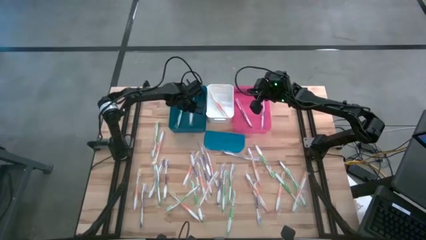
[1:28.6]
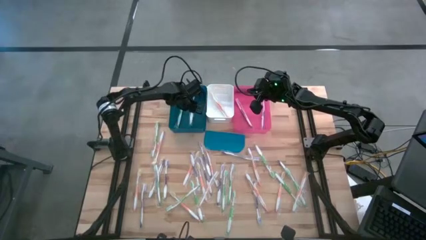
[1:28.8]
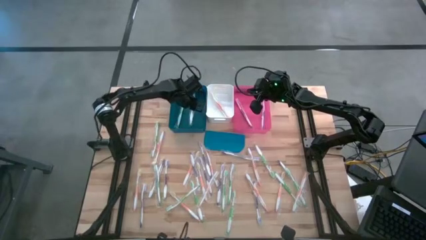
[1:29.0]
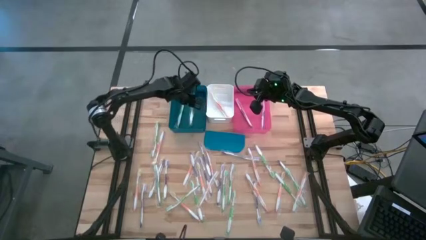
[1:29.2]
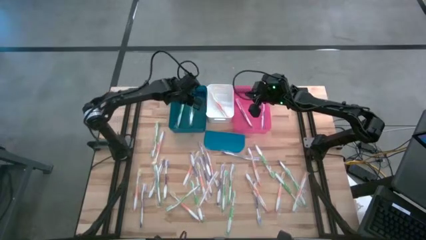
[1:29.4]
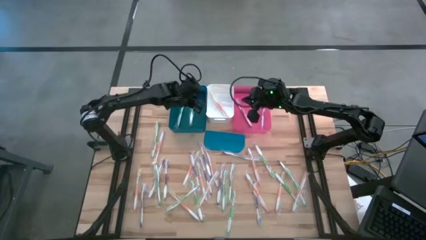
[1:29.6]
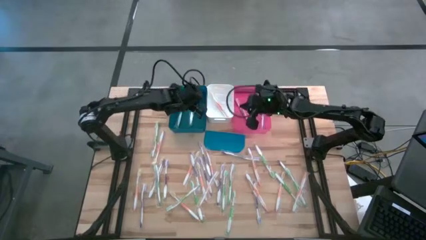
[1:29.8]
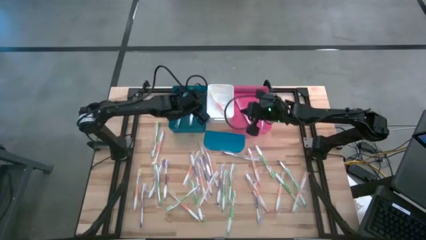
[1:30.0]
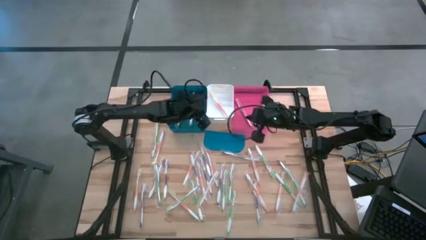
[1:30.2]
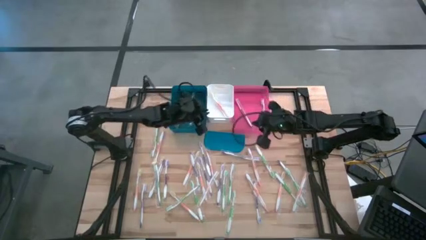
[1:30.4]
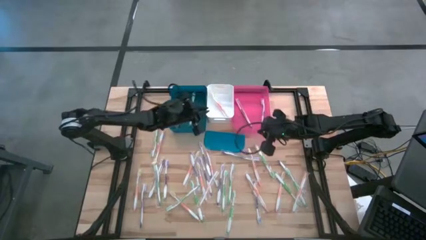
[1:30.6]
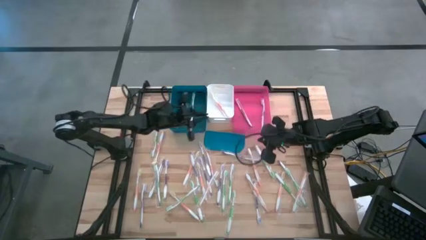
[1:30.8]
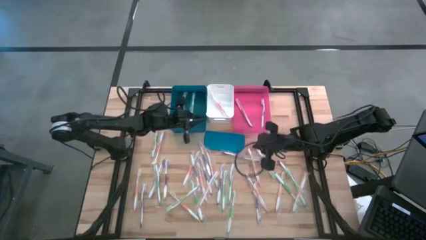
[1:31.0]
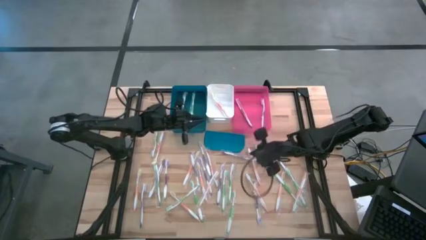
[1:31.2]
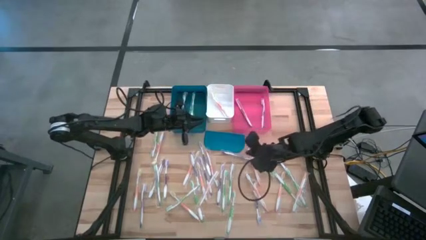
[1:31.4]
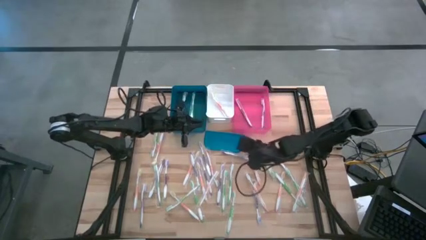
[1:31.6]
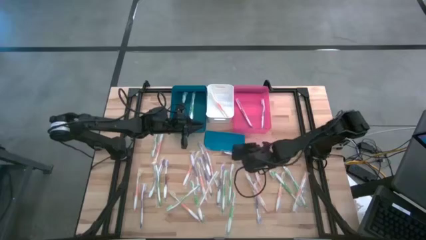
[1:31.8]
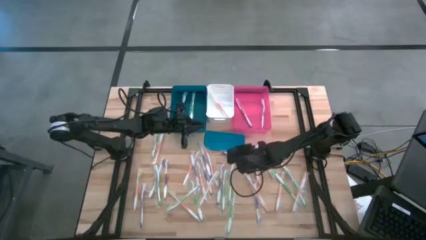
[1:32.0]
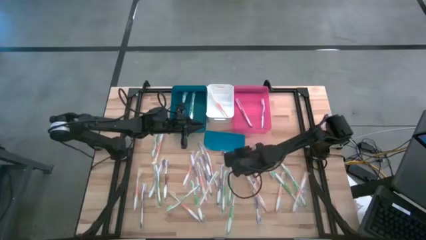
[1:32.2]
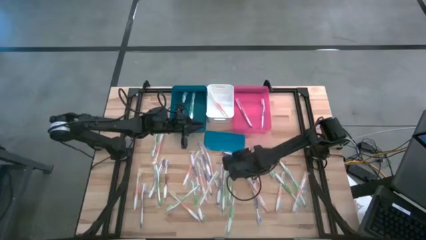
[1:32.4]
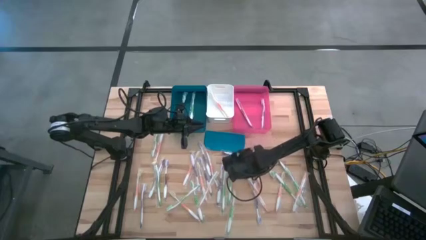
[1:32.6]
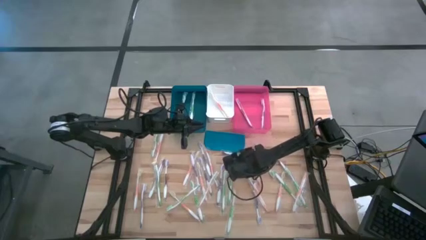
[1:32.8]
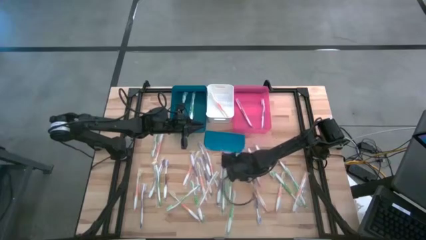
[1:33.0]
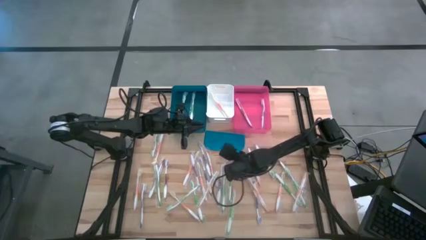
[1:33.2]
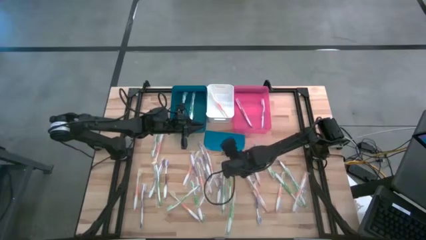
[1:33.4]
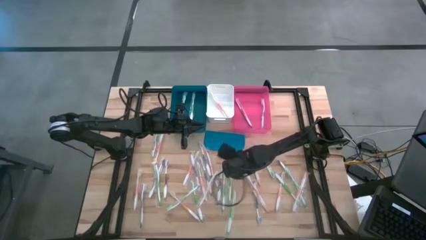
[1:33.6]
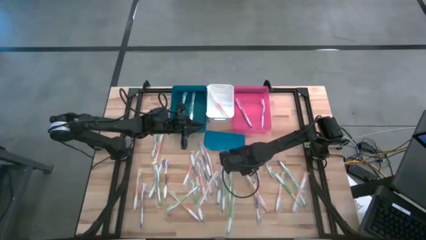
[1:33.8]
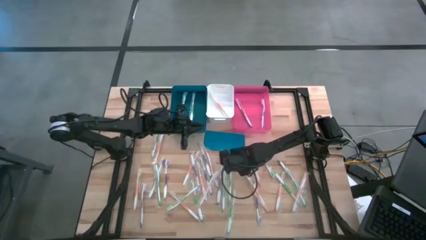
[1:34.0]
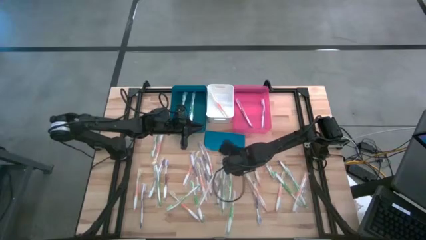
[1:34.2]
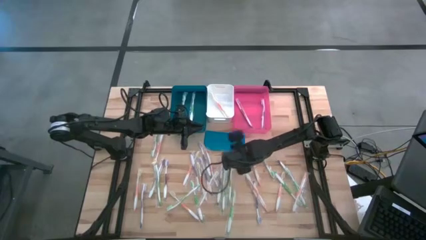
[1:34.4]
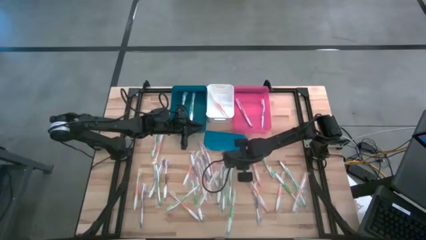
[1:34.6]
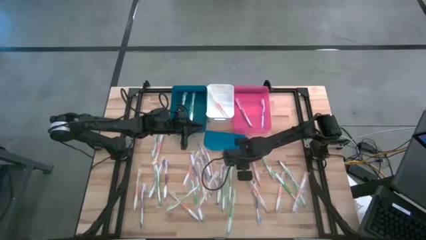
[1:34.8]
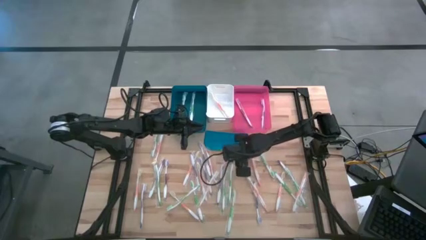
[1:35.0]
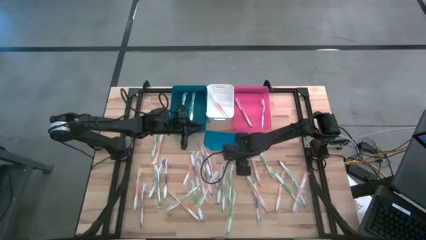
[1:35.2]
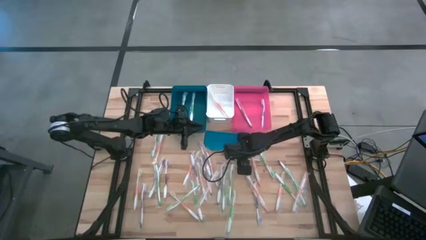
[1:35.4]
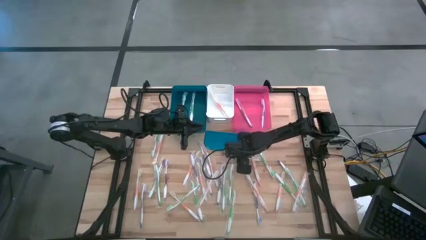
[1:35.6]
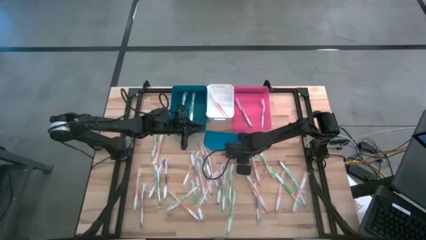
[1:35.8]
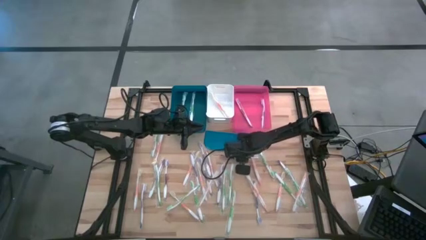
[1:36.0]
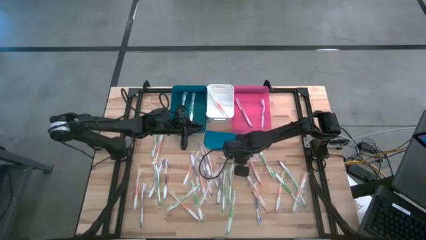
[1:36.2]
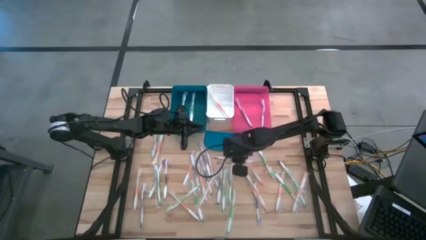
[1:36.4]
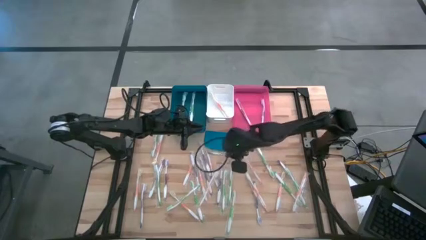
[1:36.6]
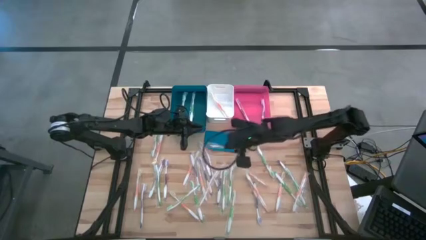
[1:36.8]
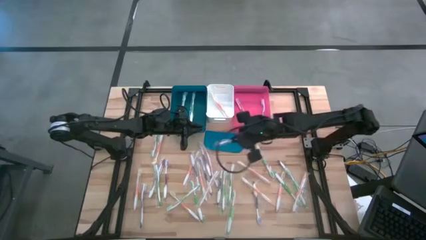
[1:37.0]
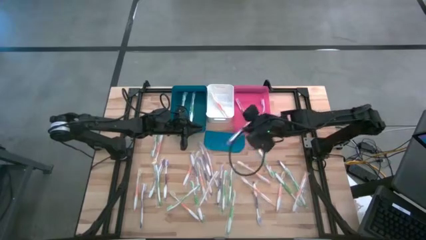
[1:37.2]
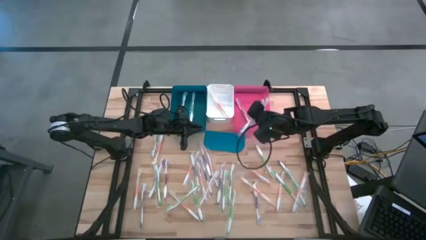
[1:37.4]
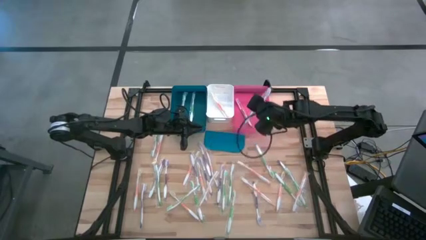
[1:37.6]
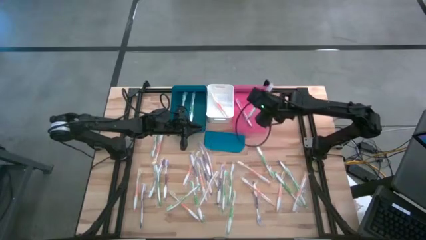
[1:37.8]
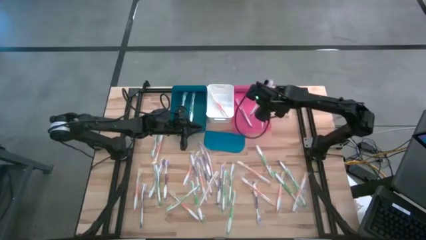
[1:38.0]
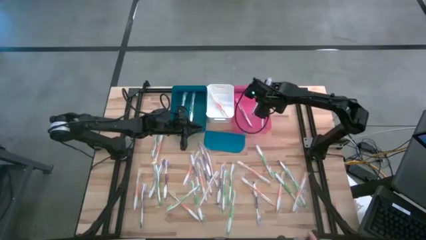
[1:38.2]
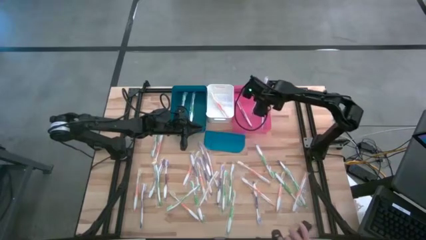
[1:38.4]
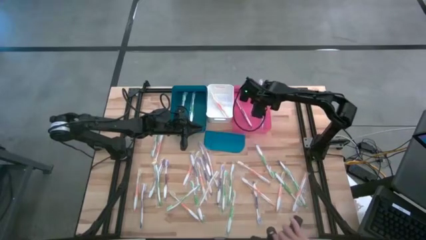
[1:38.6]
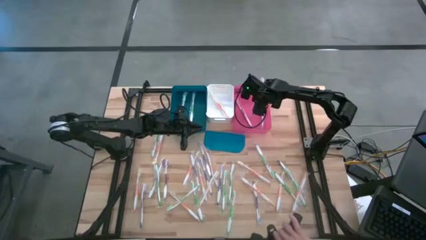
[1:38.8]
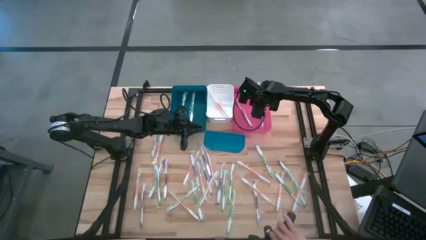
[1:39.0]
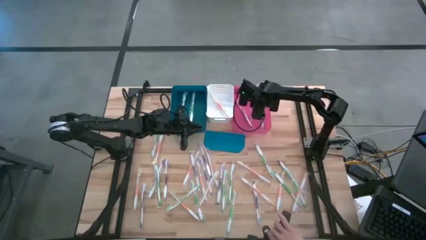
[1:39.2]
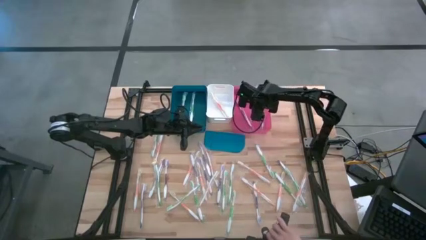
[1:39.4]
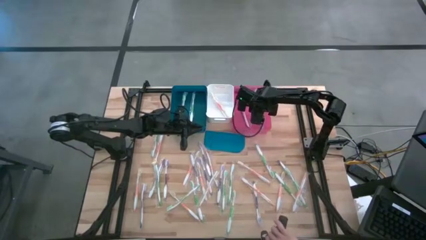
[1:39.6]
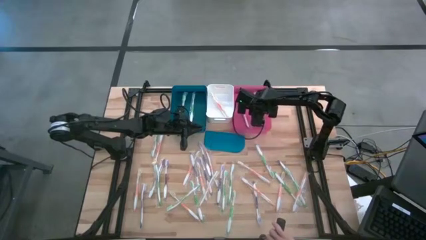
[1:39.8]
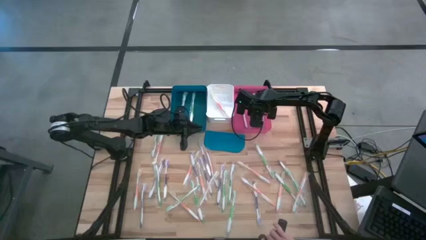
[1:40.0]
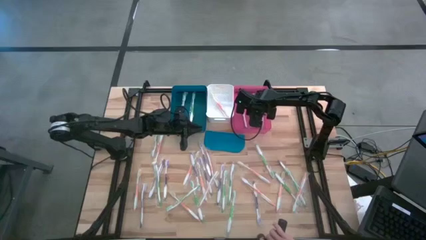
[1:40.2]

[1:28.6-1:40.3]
Task: Pick & Place Toothbrushes
Put the purple toothbrush into the pink bin

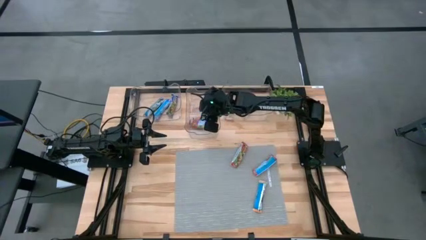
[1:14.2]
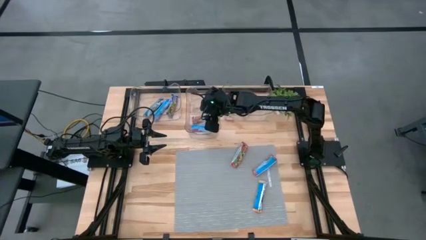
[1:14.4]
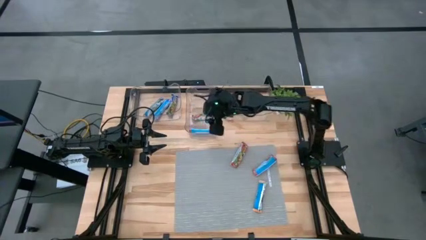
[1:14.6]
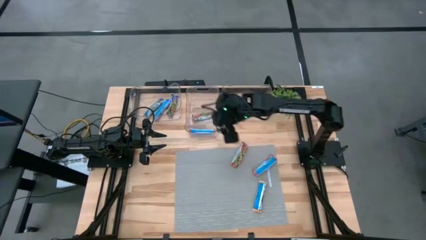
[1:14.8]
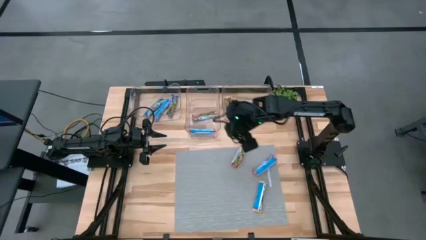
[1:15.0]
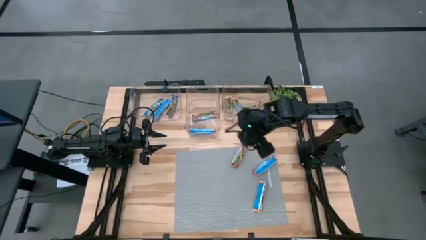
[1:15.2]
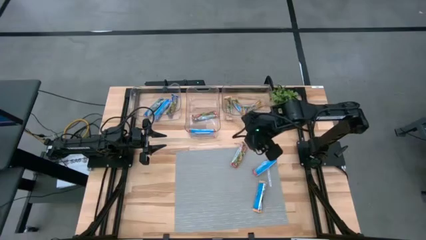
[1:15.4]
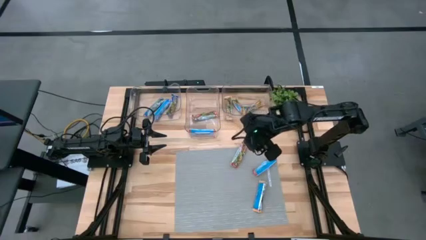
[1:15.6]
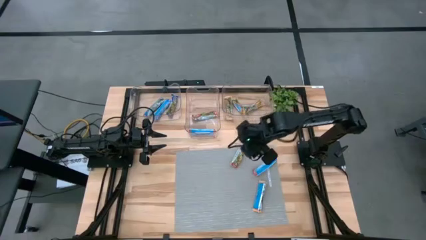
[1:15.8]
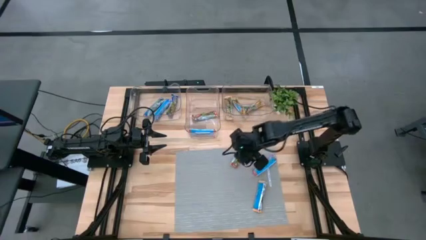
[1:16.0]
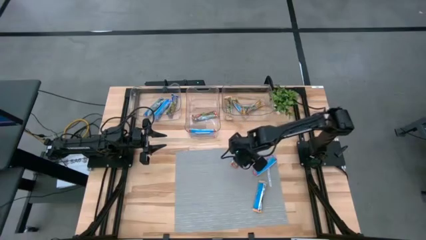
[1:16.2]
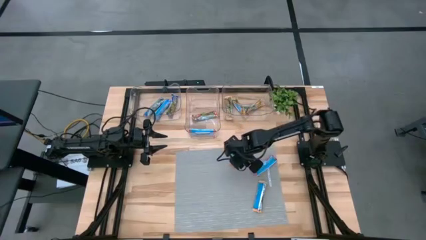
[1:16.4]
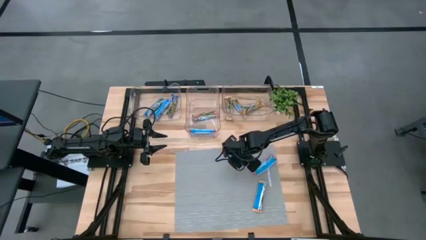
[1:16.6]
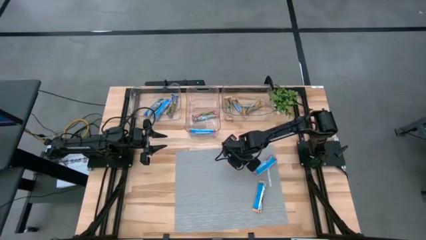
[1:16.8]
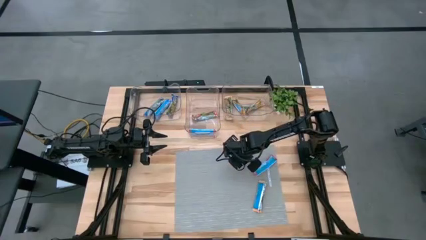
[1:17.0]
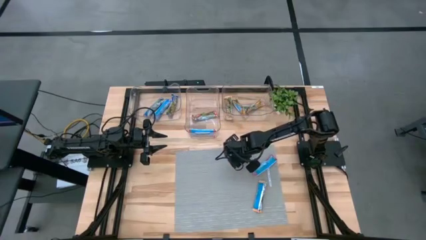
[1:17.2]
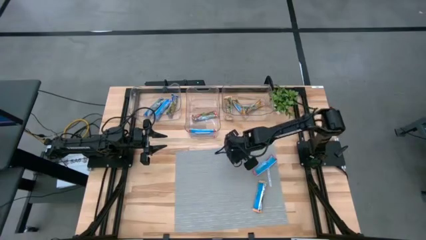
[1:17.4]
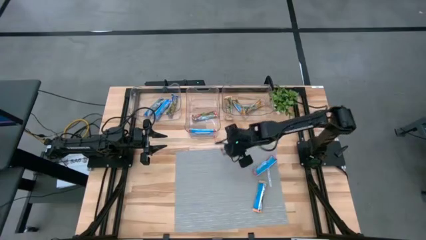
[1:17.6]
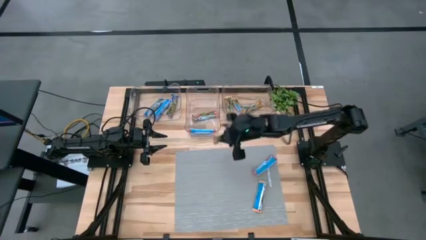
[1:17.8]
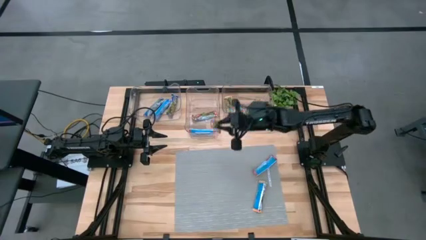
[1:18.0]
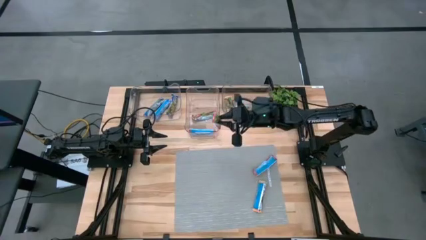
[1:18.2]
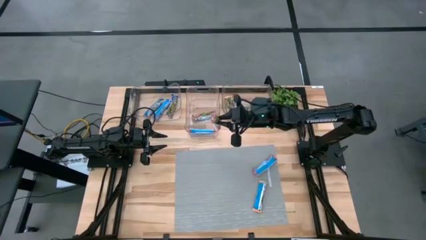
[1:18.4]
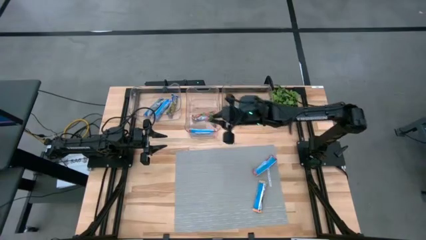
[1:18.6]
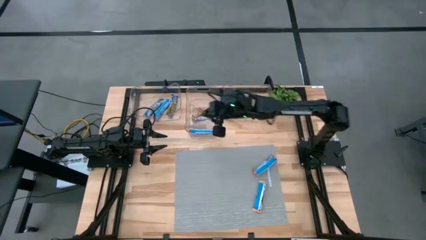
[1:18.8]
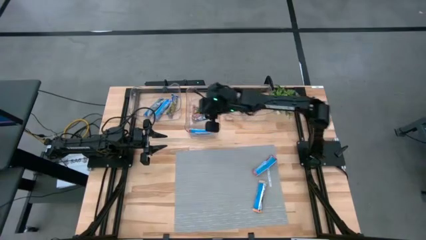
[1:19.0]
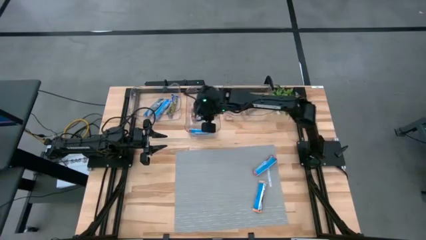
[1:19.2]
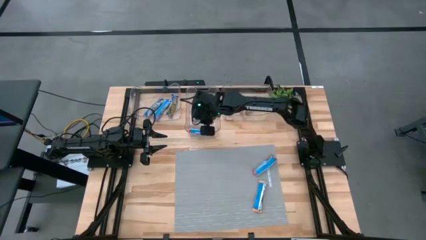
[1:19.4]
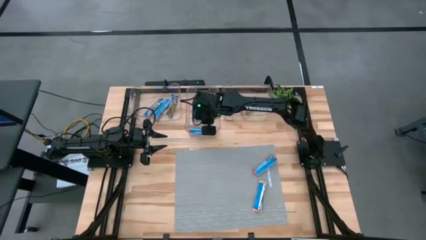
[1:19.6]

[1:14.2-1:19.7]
Task: Pick and place Granola Bars by type
Put the red granola bar into the middle transparent bin
